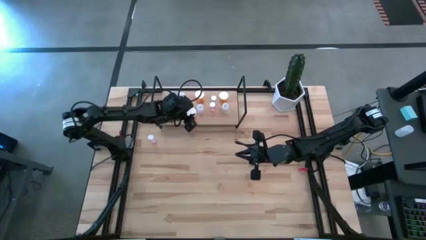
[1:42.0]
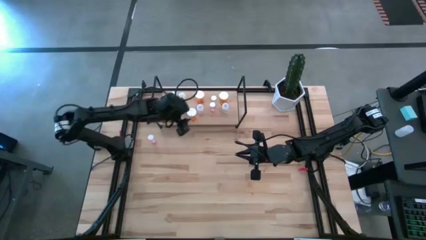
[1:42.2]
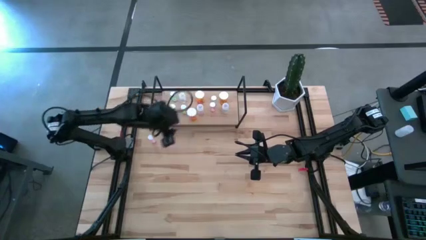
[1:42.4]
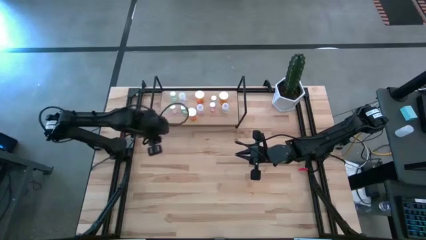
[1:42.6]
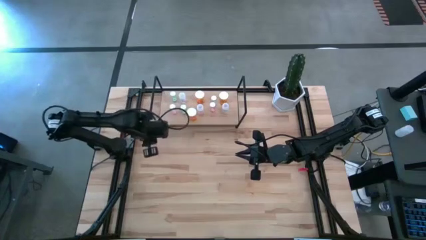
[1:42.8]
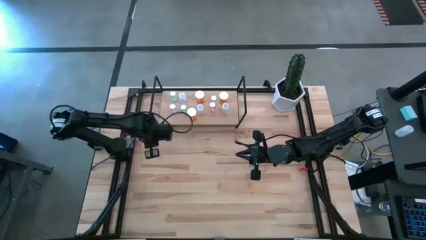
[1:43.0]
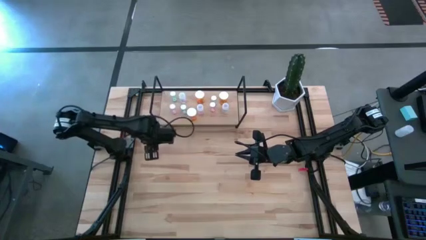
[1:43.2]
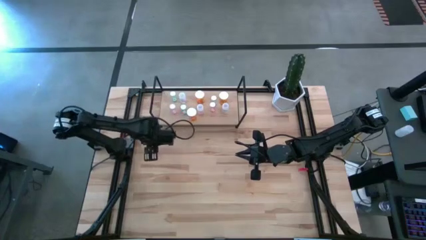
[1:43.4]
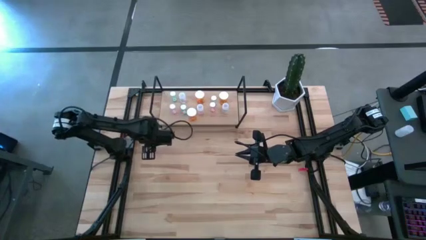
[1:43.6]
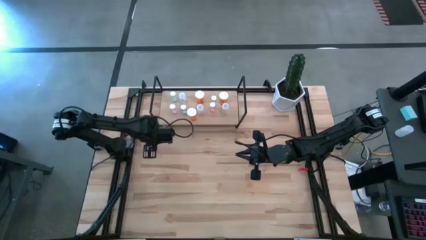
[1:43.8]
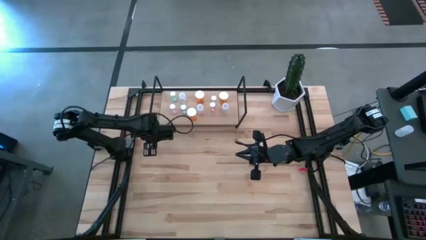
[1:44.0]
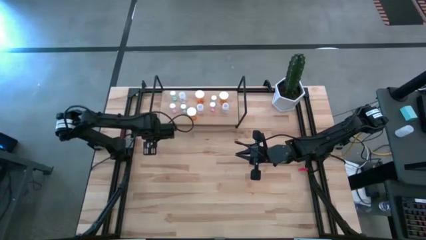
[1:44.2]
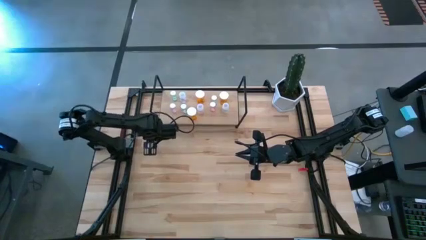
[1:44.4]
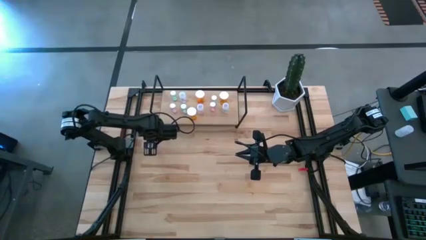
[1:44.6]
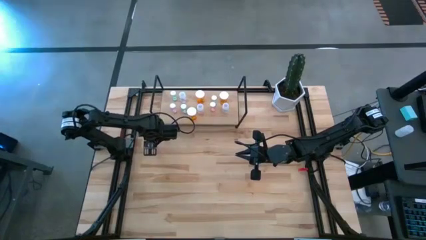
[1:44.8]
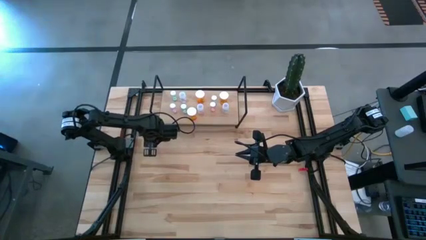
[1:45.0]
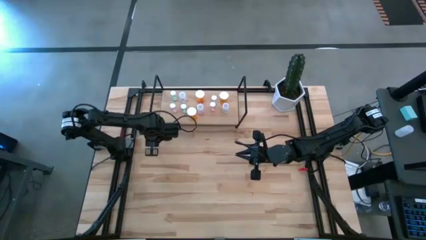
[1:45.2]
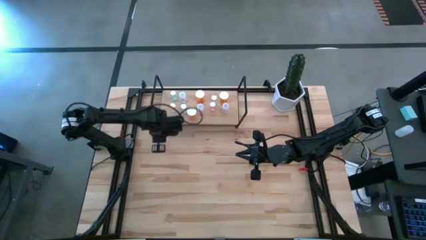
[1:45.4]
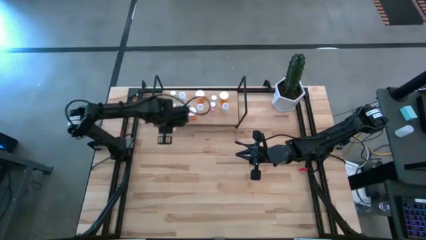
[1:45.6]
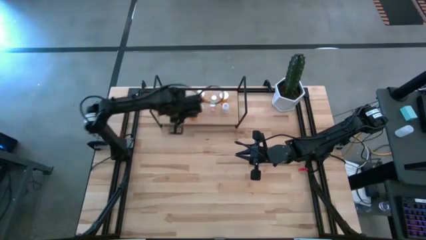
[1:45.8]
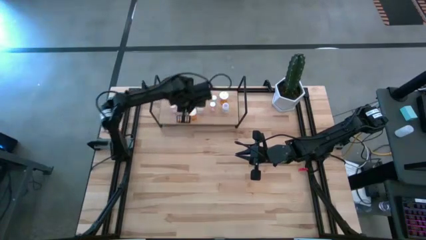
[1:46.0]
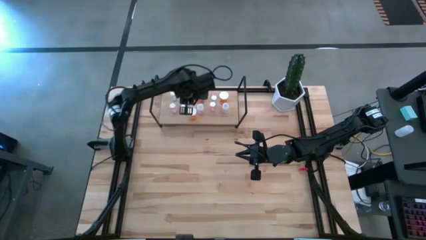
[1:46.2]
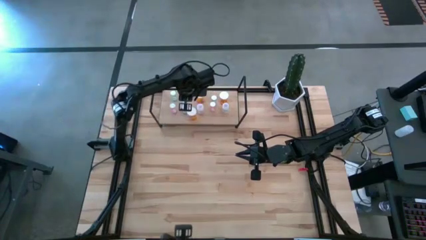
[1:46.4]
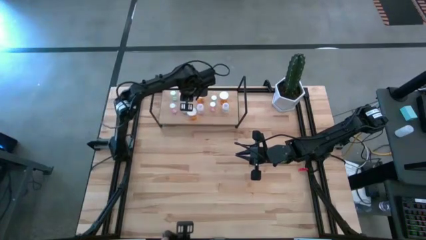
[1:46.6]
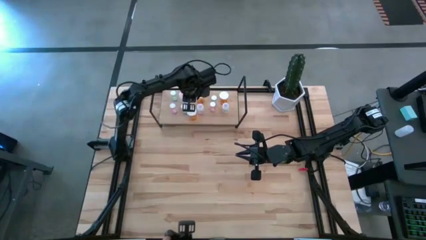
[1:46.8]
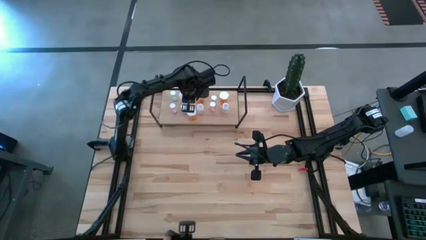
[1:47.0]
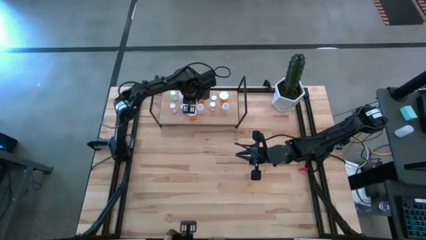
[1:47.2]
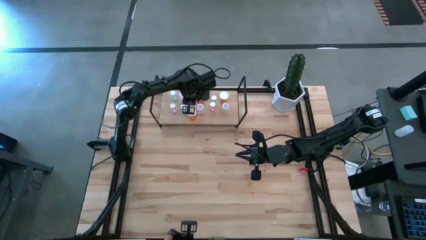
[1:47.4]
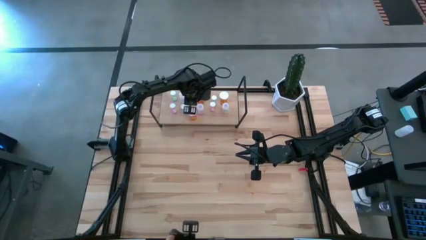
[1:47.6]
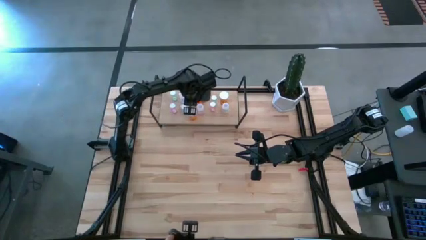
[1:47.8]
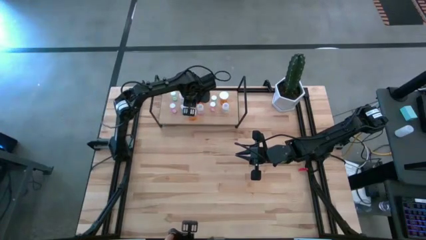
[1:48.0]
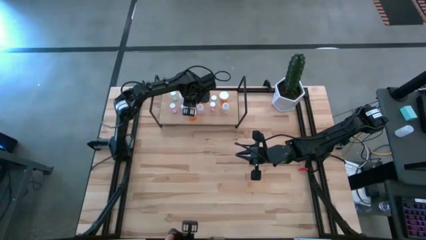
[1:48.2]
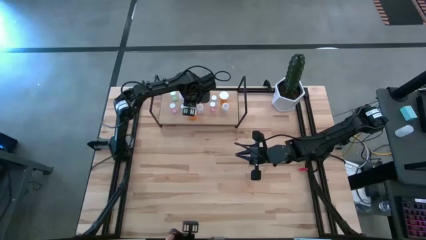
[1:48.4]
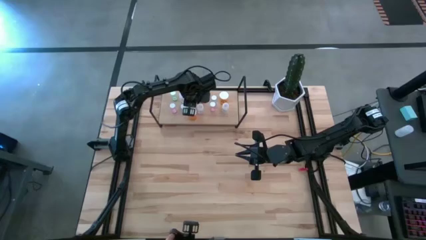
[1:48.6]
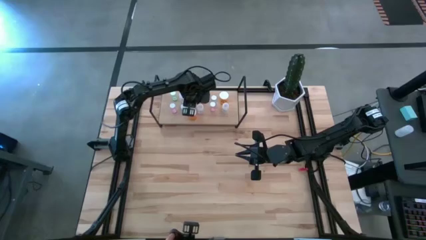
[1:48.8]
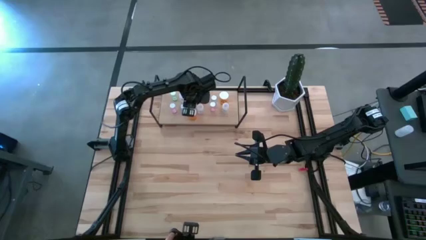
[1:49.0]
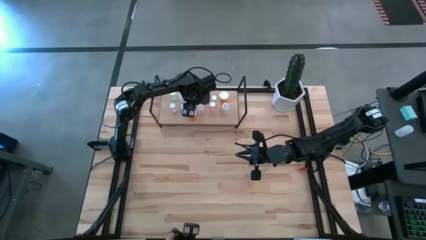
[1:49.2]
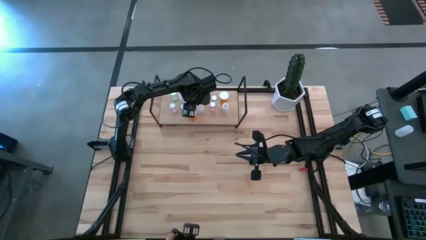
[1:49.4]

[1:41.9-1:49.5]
Task: Pick and place medicine bottles onto shelf by color
Put the pink pill bottle on the shelf

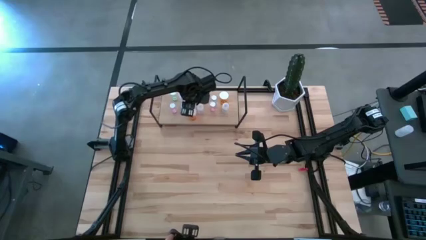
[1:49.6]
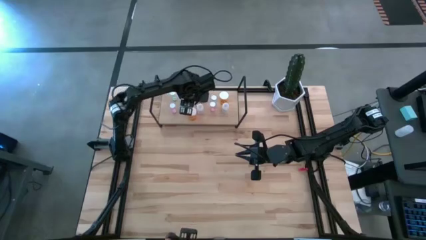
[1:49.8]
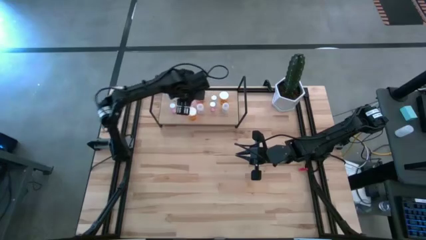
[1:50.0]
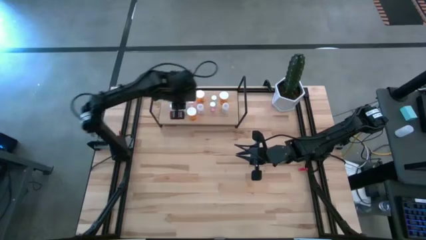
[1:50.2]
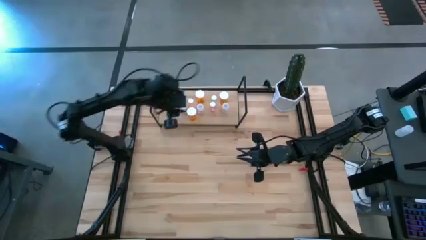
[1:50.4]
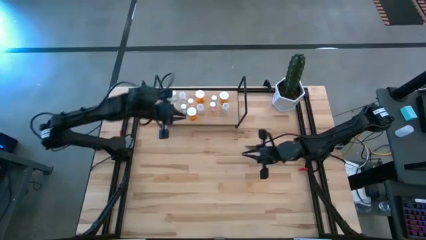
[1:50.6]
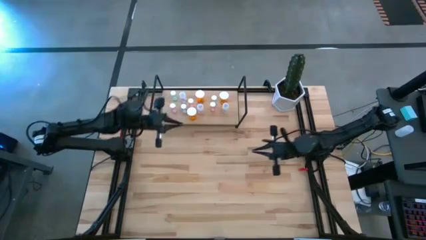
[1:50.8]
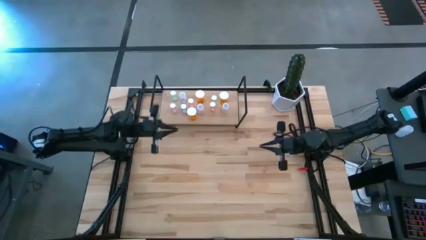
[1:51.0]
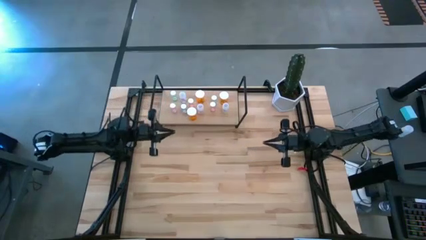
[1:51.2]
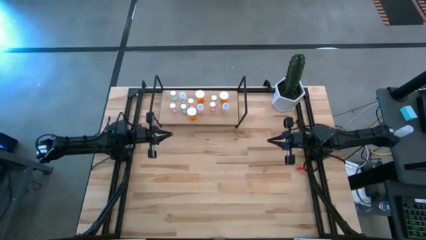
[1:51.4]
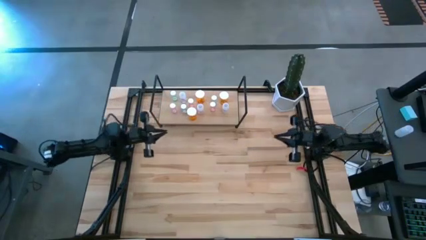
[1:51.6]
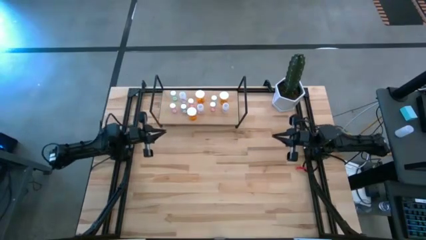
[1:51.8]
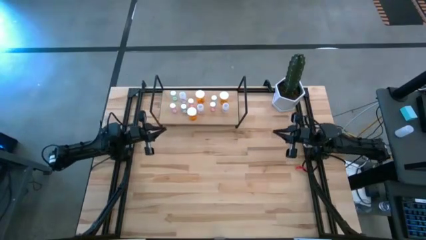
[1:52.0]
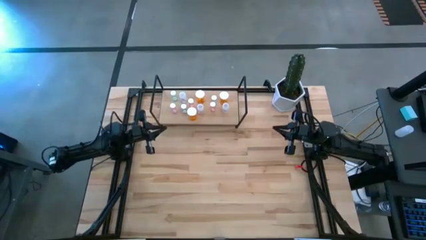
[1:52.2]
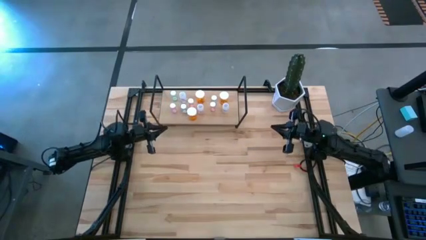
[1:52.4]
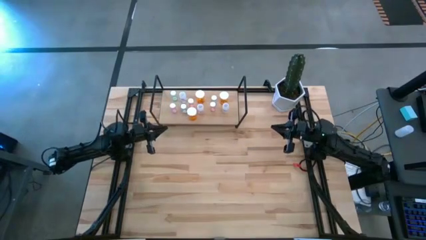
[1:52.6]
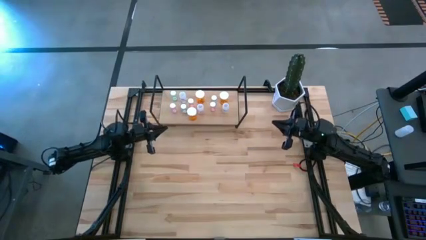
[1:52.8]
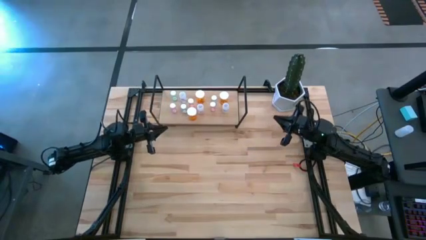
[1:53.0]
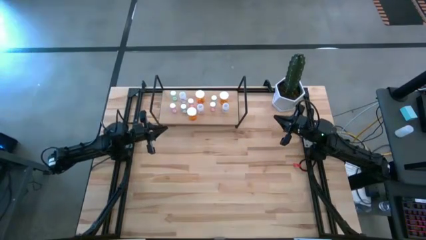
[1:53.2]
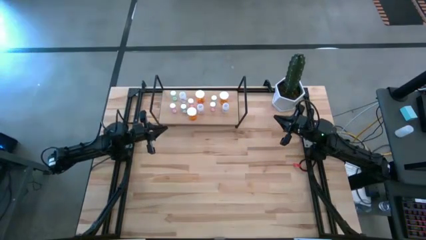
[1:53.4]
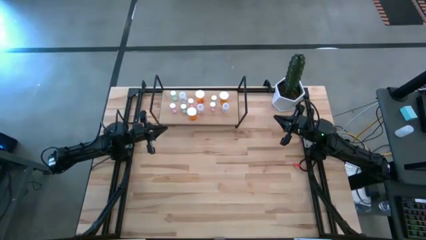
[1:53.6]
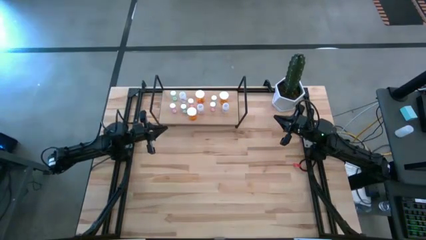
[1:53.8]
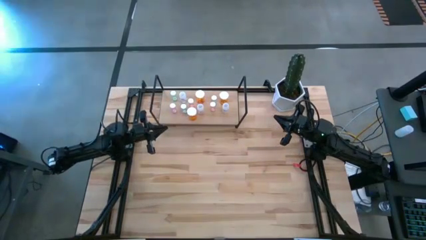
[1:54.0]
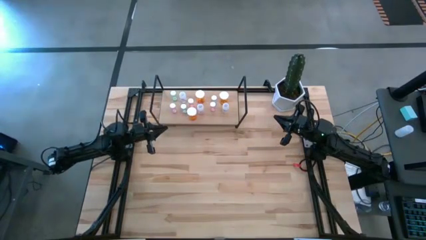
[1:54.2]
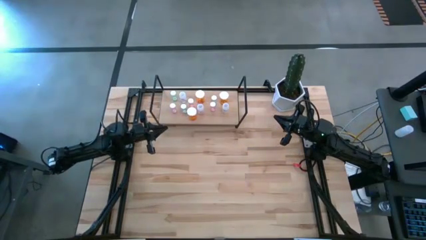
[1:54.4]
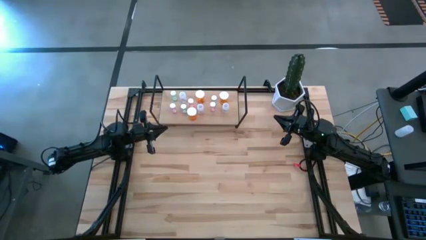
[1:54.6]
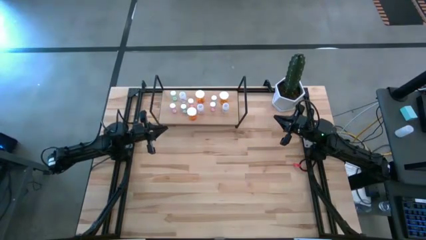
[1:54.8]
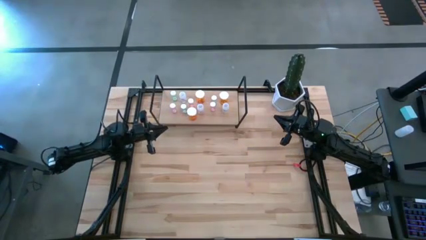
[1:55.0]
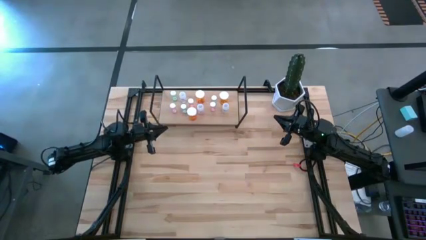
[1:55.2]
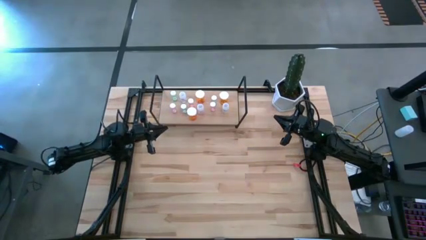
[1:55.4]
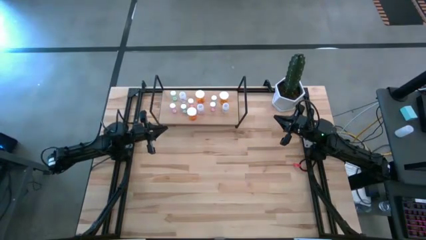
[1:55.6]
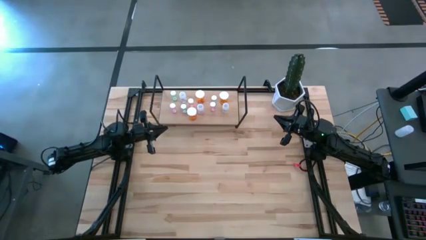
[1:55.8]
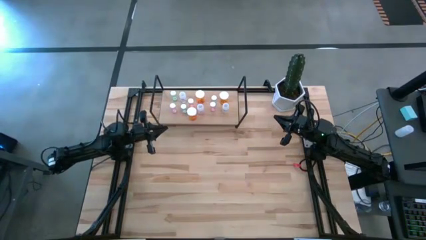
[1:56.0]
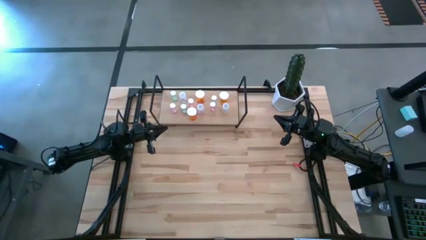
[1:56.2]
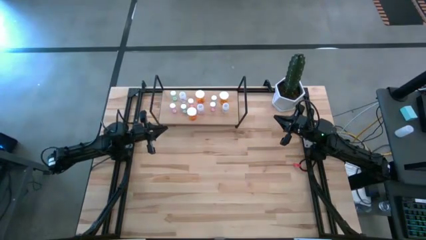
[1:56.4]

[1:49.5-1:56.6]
Return to Home Position
